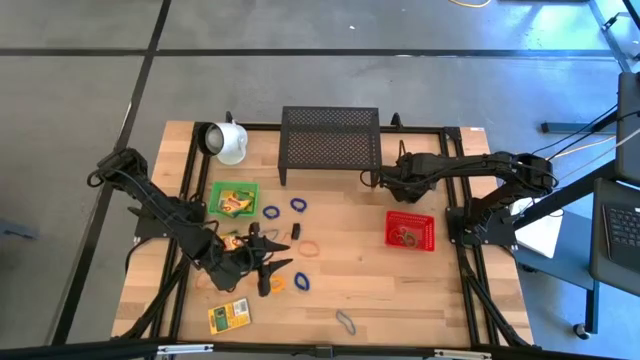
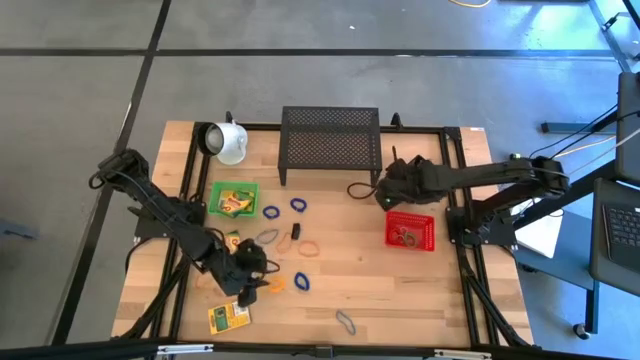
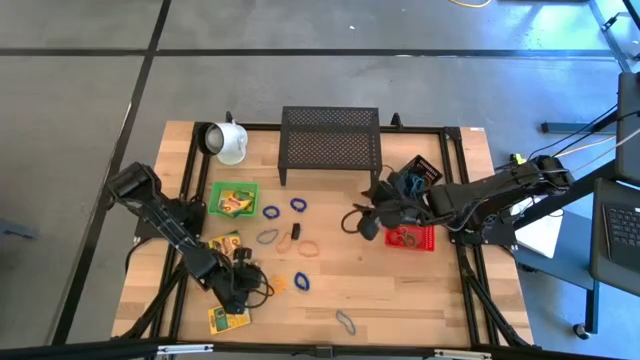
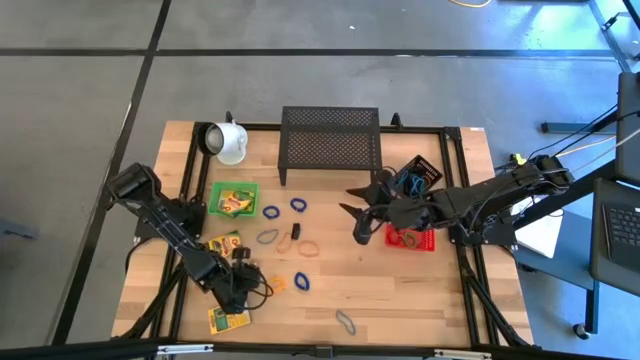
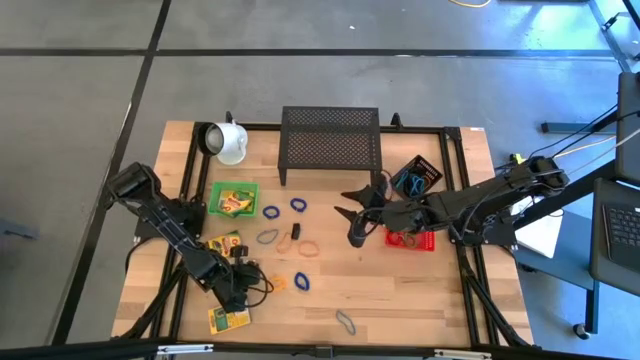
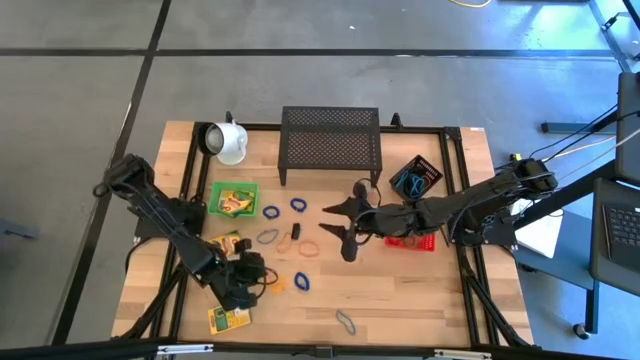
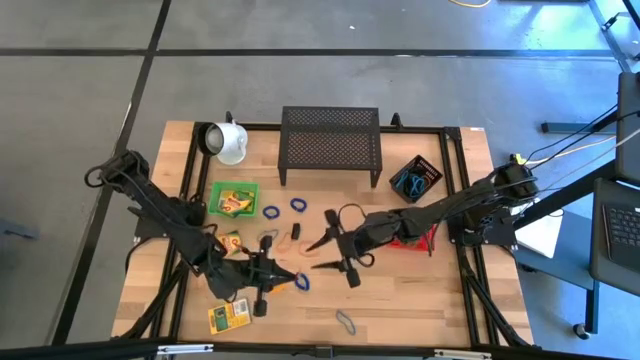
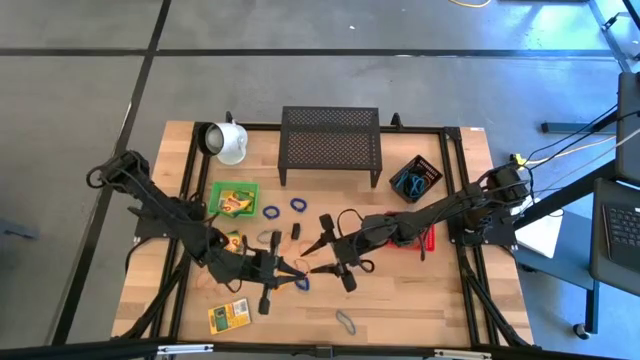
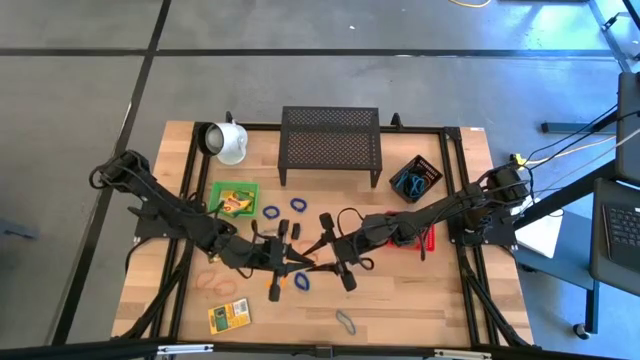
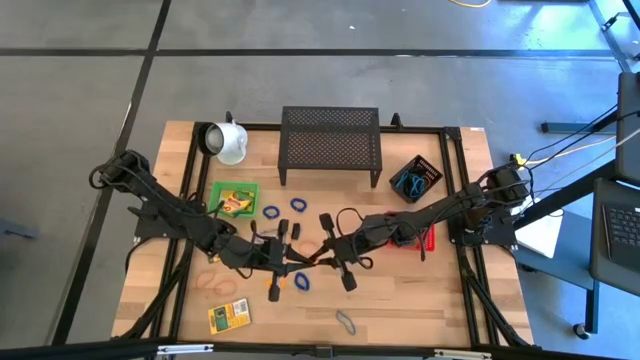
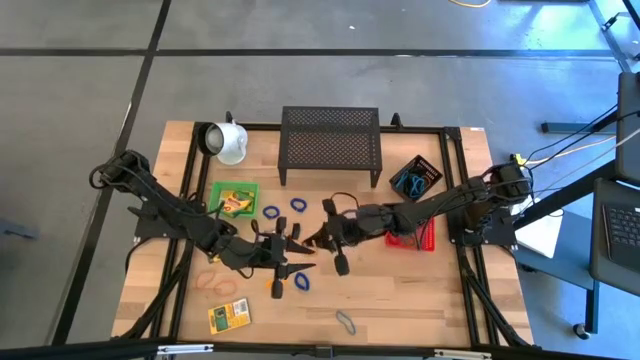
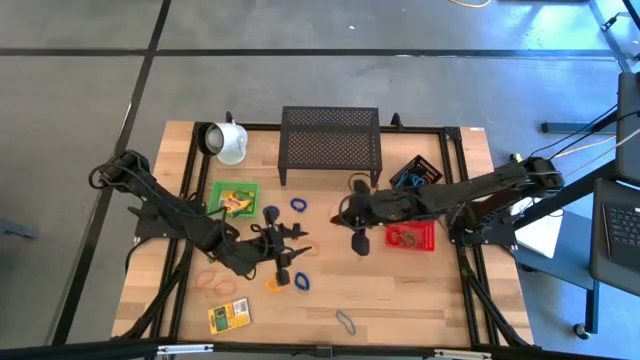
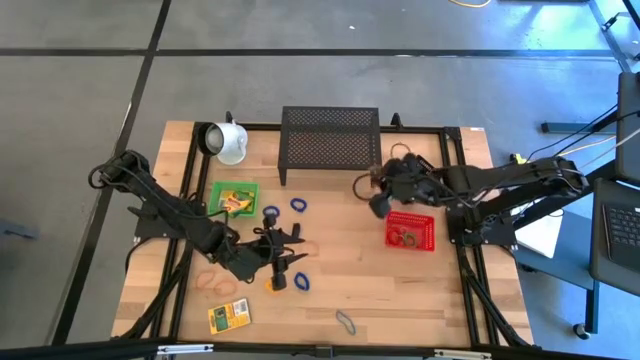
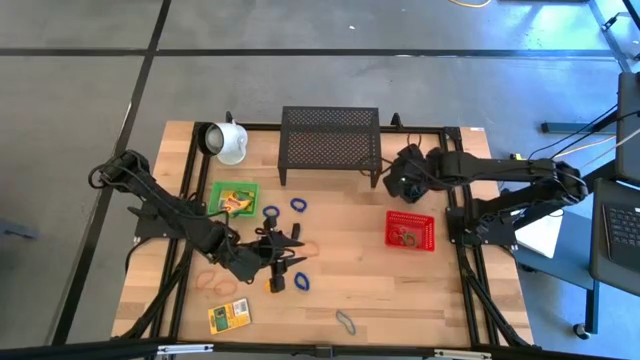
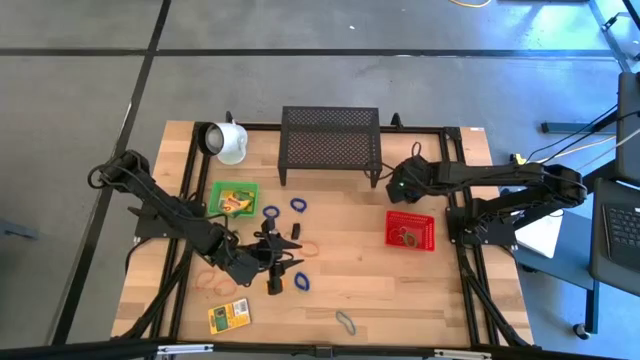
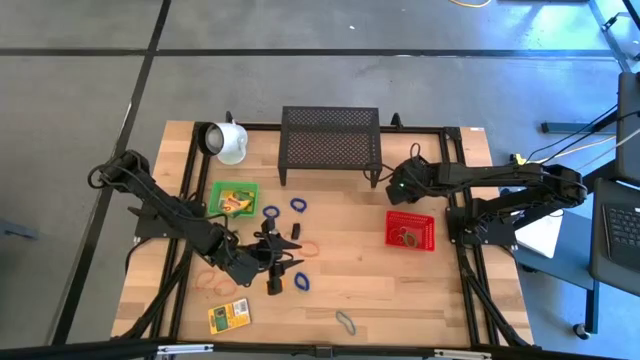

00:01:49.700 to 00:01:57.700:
Task: Pick & Place Office Desk Supplies
Put the orange rubber band into the black bin

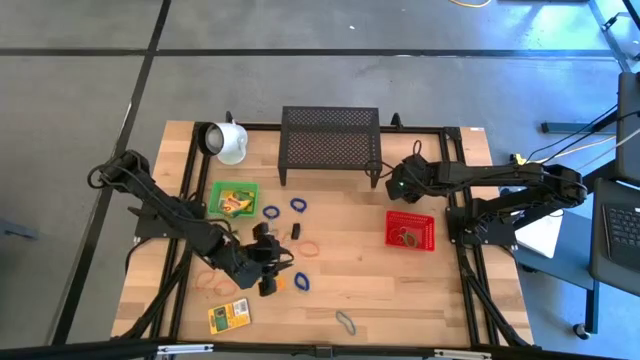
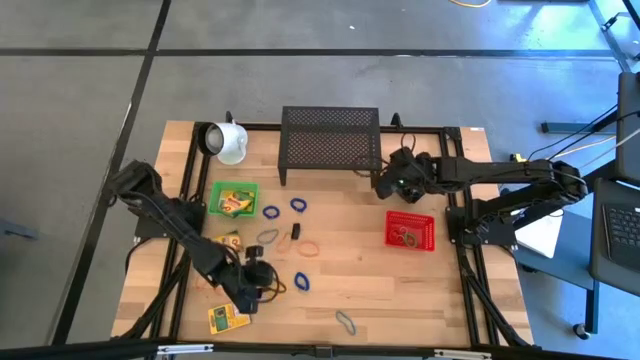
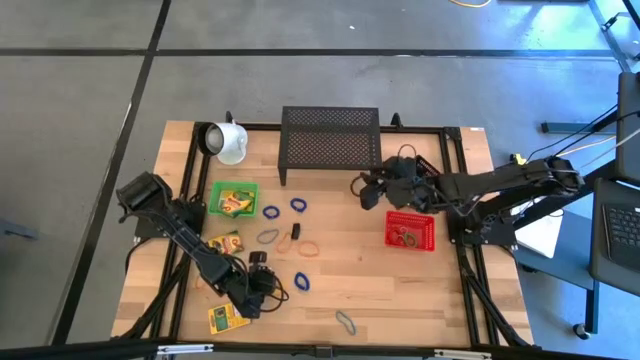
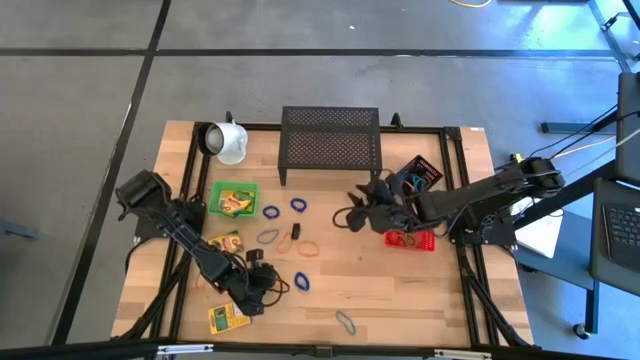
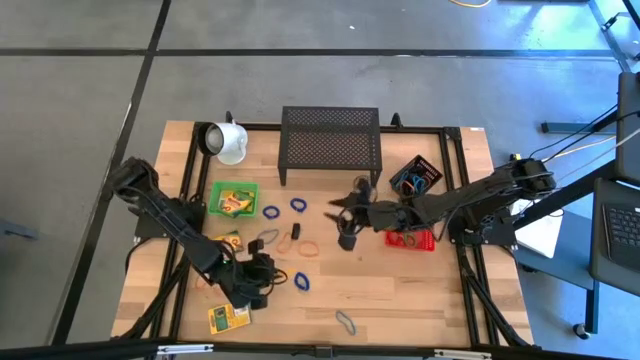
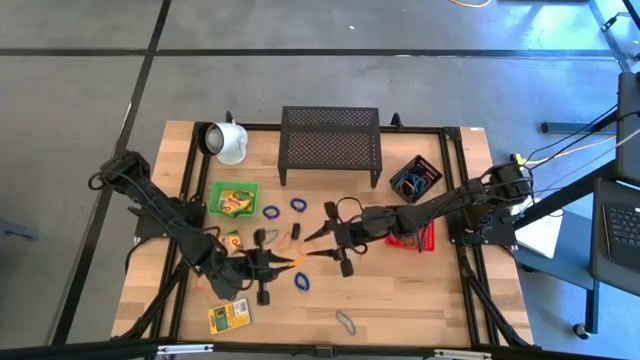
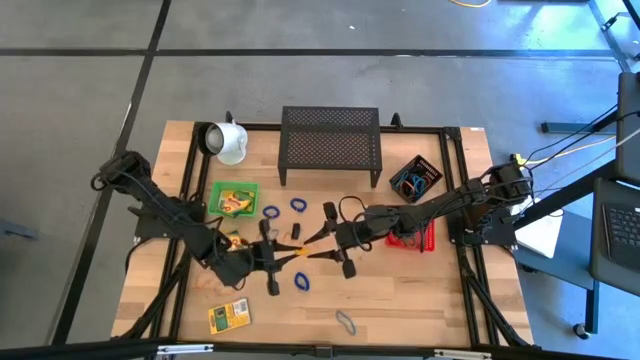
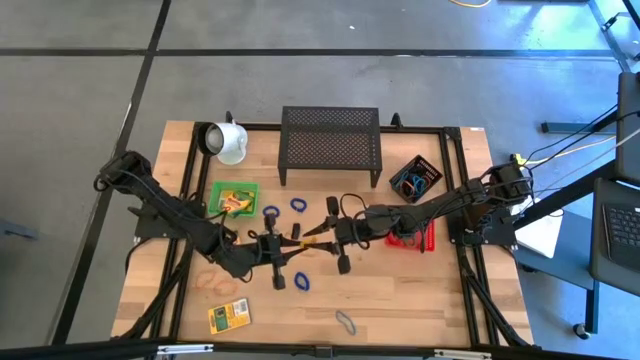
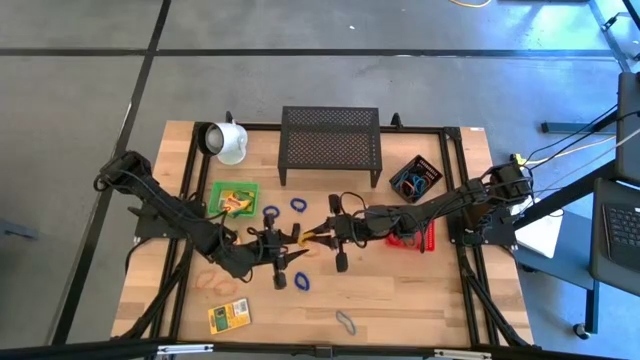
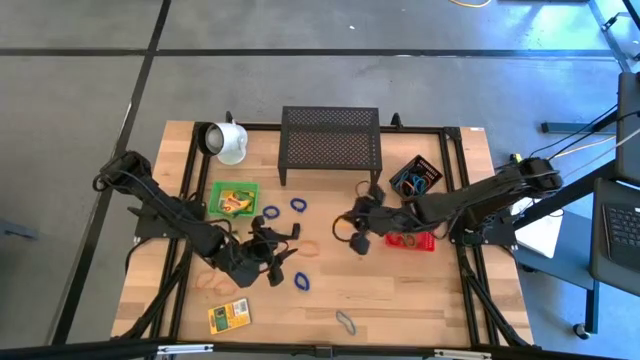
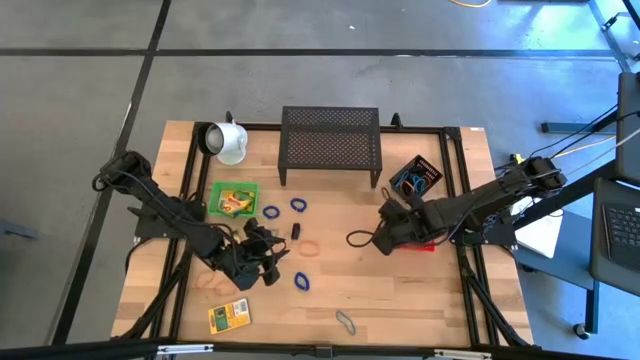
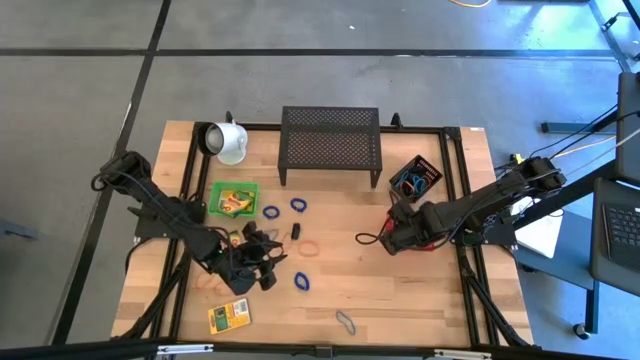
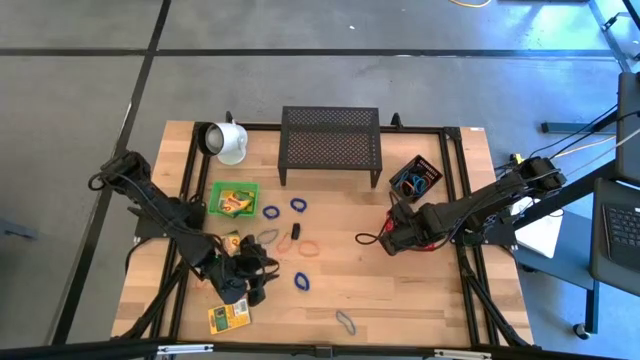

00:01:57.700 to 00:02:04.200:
Put the yellow spring keychain into the orange bin

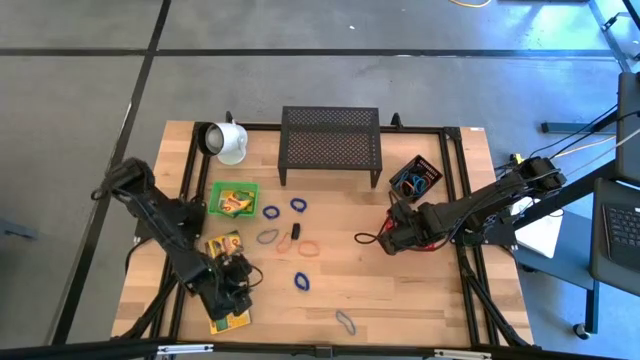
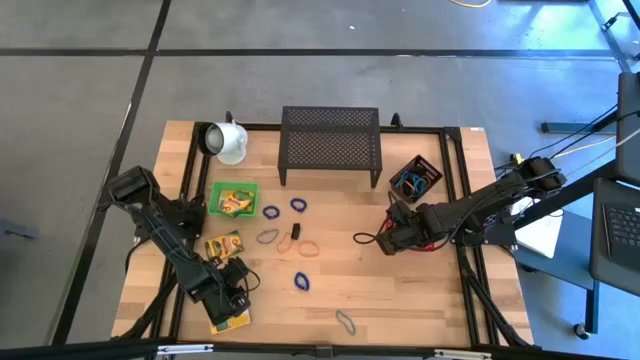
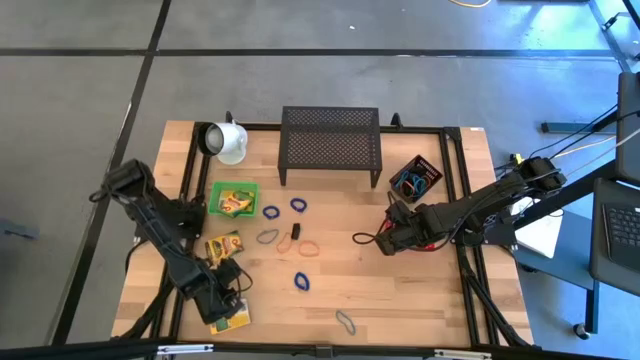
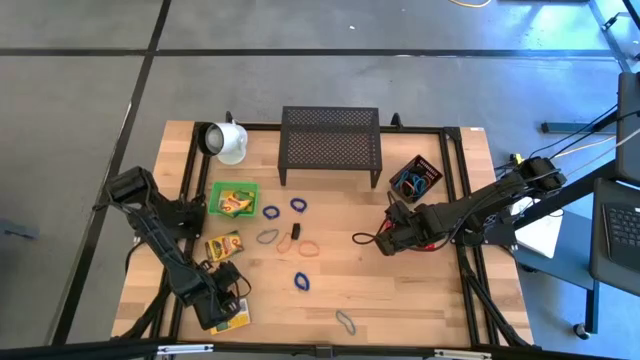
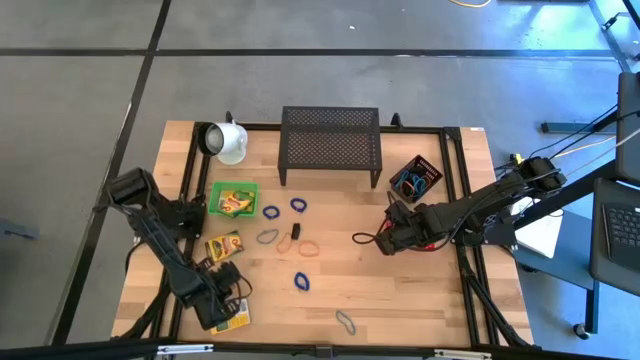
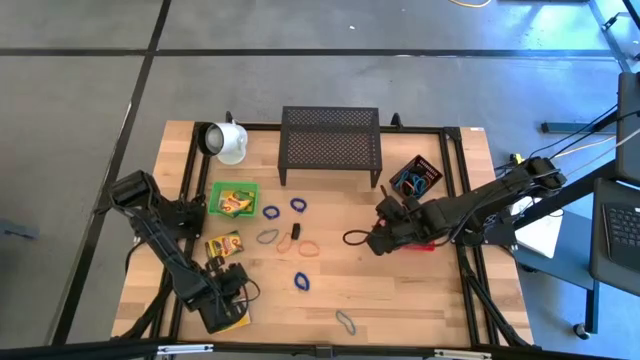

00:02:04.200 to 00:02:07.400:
Put the orange rubber band into the black bin

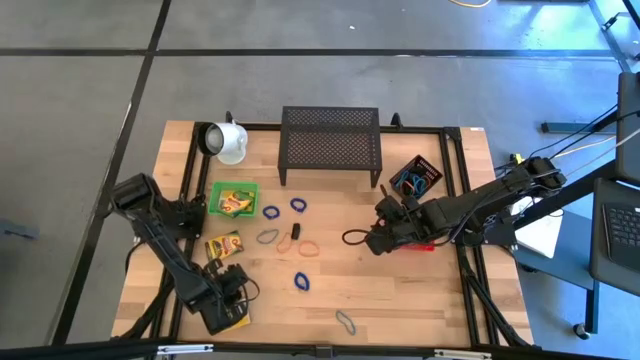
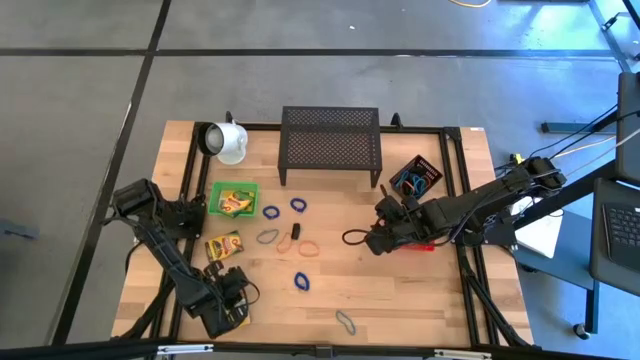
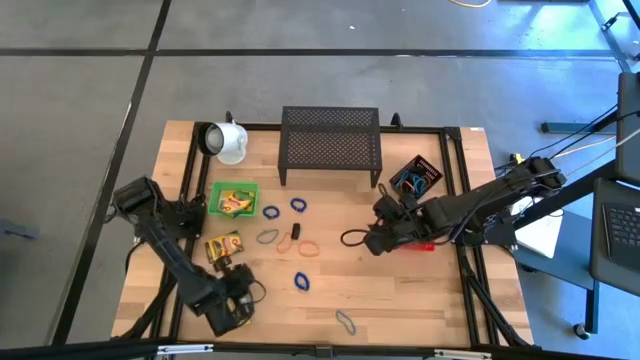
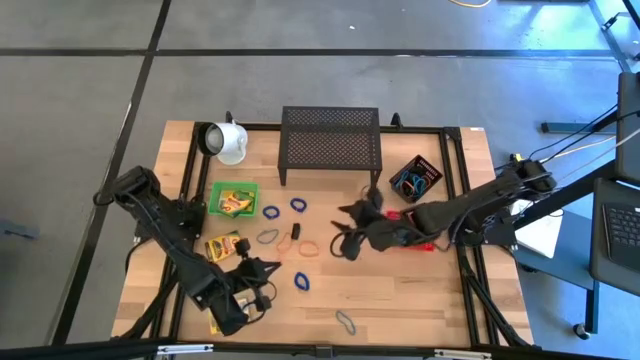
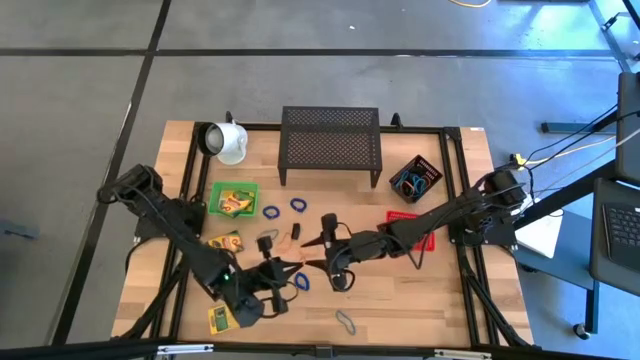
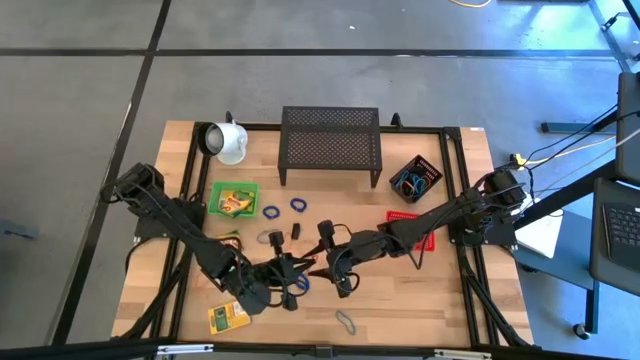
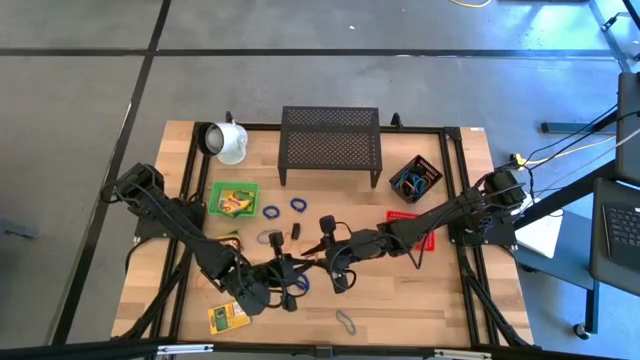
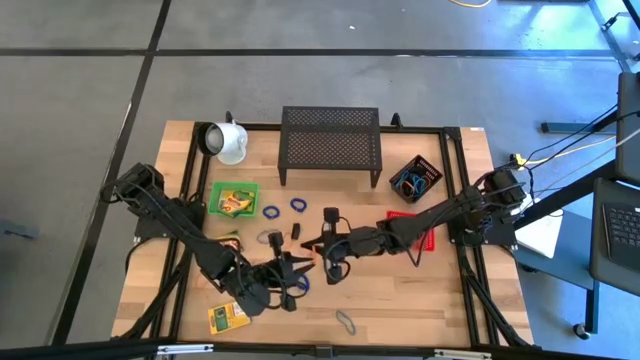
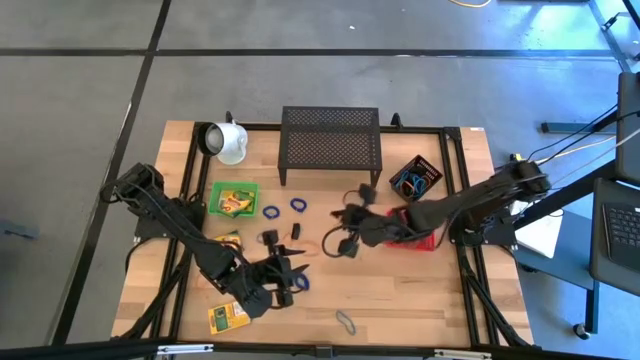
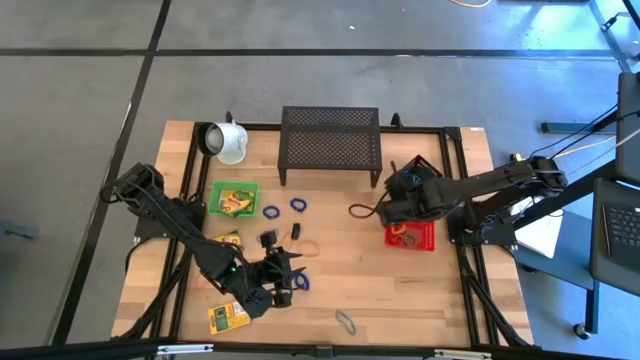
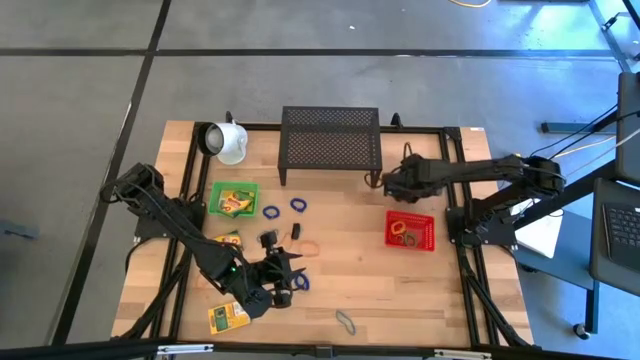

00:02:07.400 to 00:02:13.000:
Put the orange rubber band into the black bin
